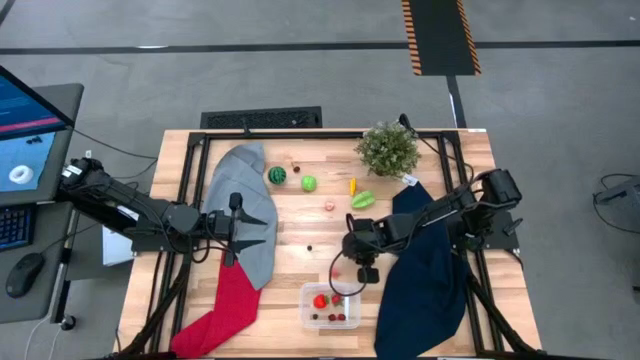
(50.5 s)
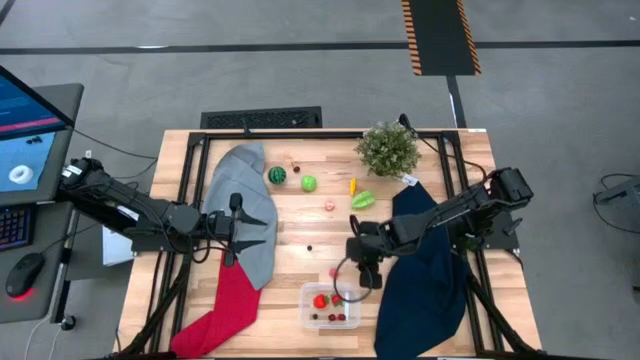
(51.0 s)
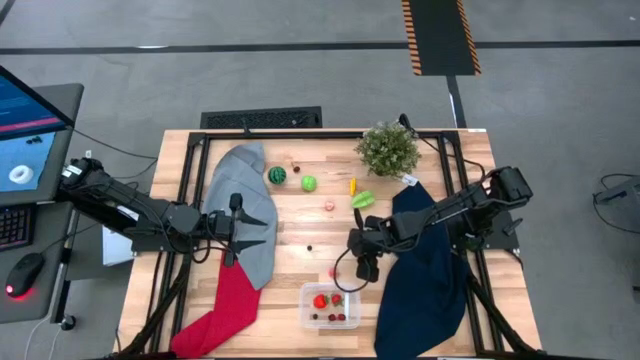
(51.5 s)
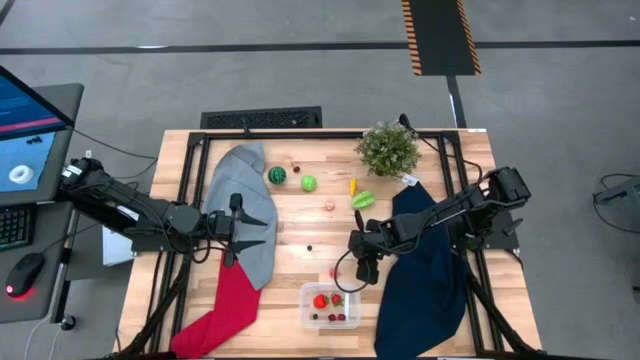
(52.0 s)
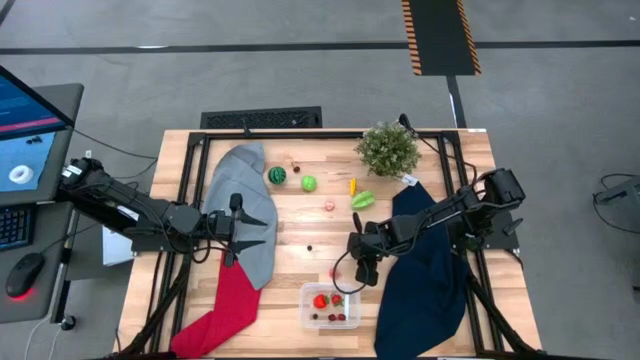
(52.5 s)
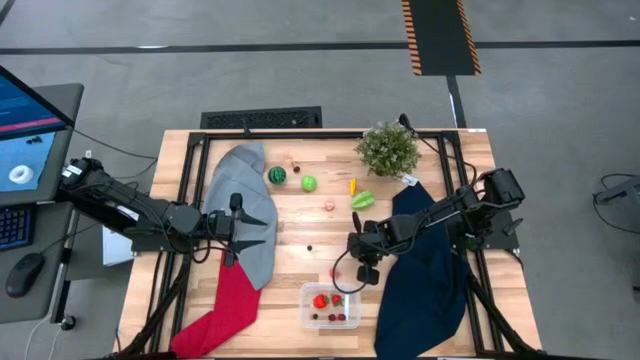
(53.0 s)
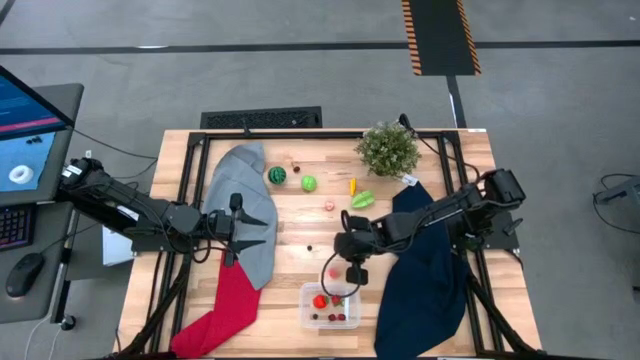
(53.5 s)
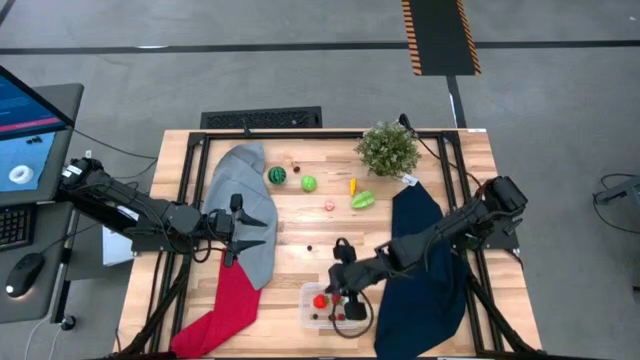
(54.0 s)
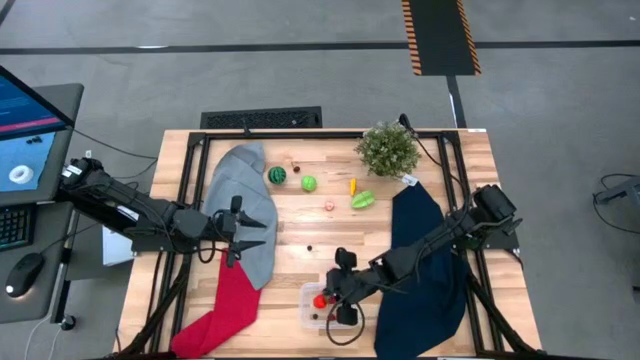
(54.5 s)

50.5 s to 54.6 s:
Task: Pick and placing Produce into tupperware
Put the cherry into the transparent bin

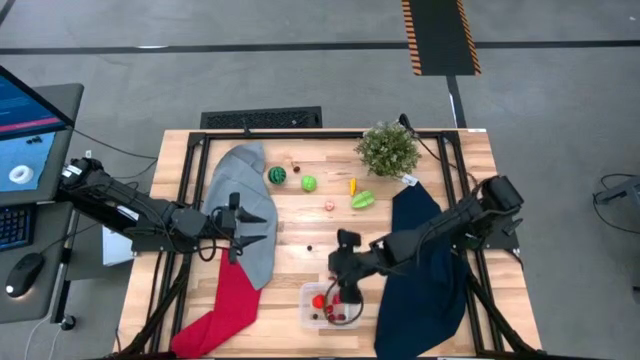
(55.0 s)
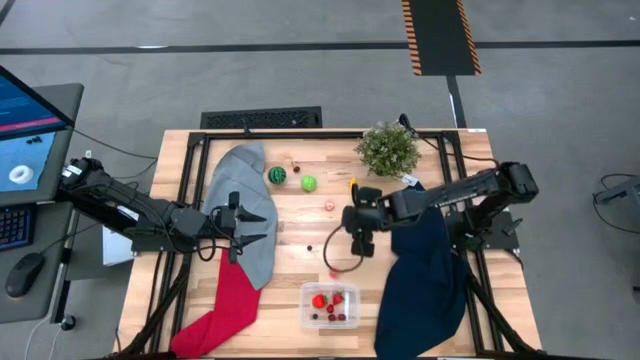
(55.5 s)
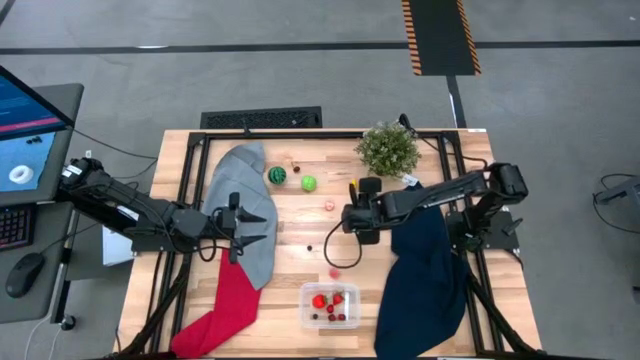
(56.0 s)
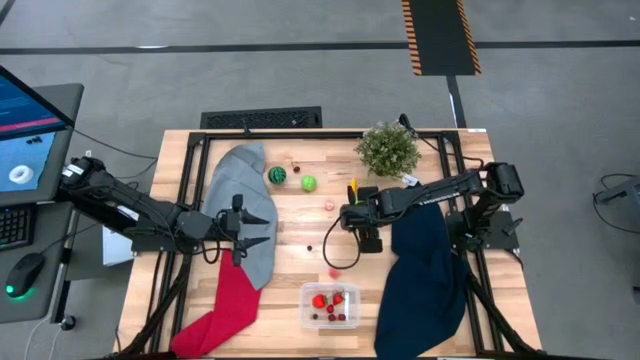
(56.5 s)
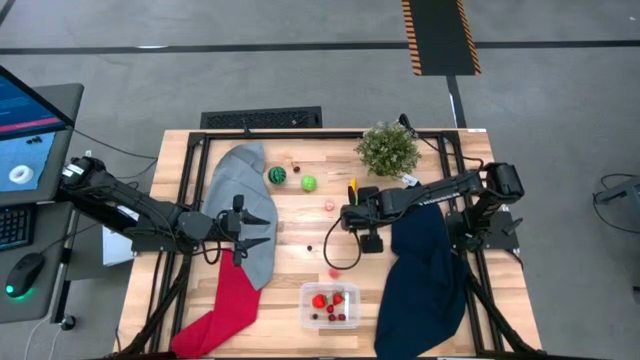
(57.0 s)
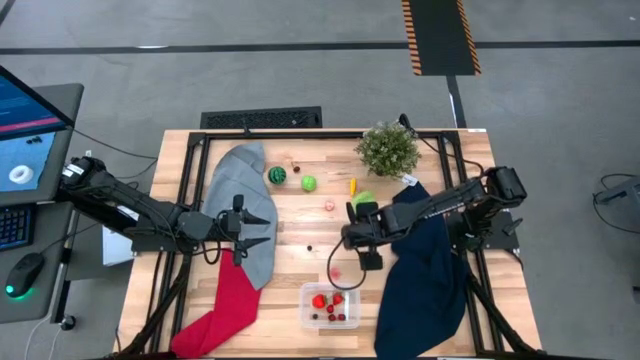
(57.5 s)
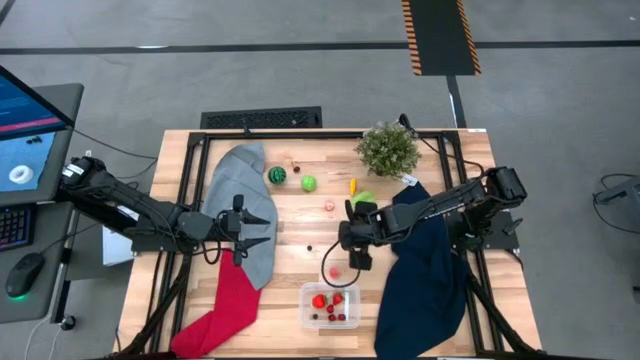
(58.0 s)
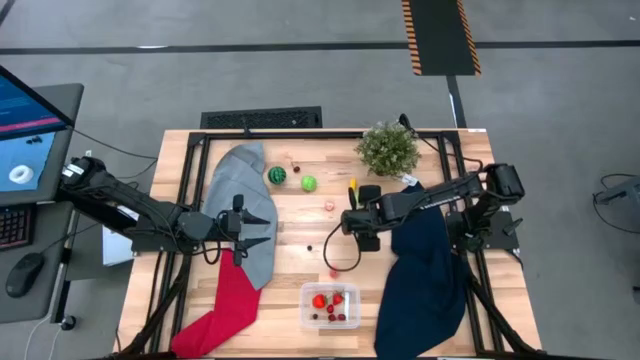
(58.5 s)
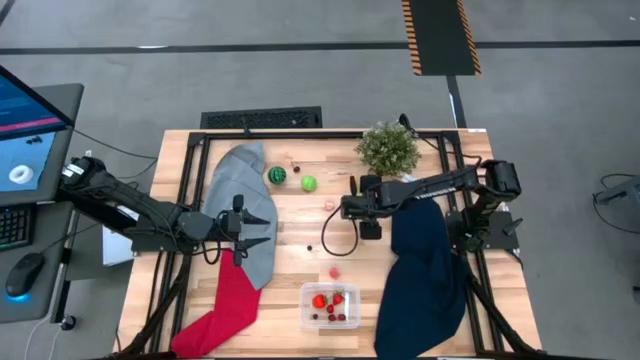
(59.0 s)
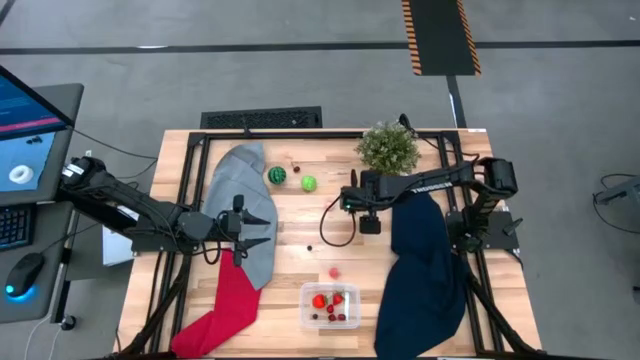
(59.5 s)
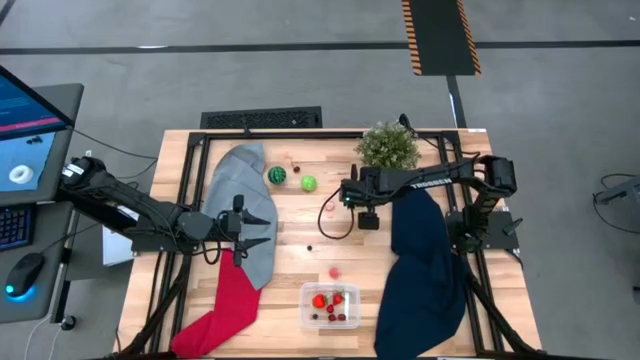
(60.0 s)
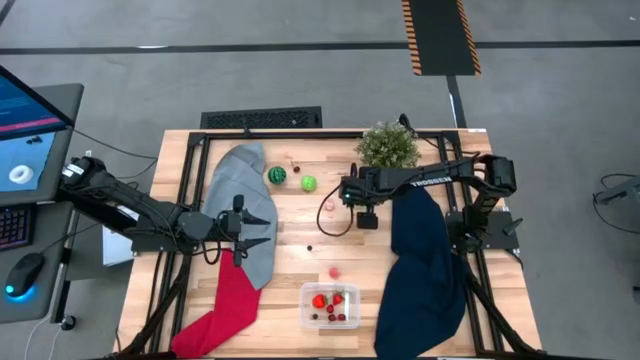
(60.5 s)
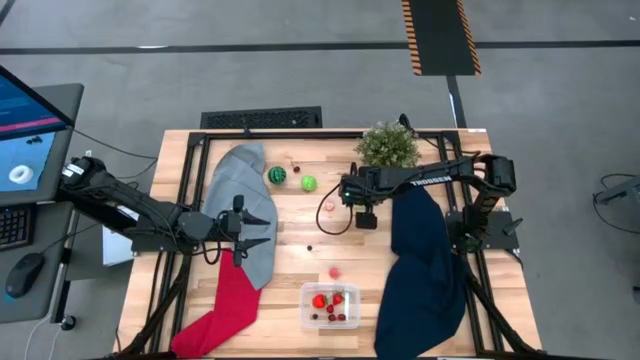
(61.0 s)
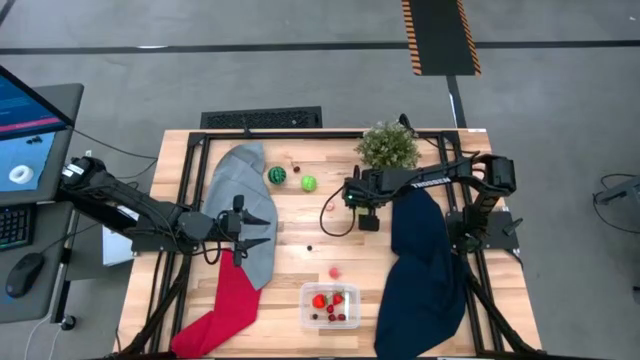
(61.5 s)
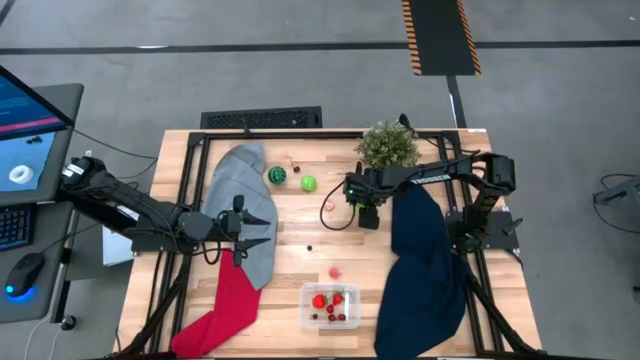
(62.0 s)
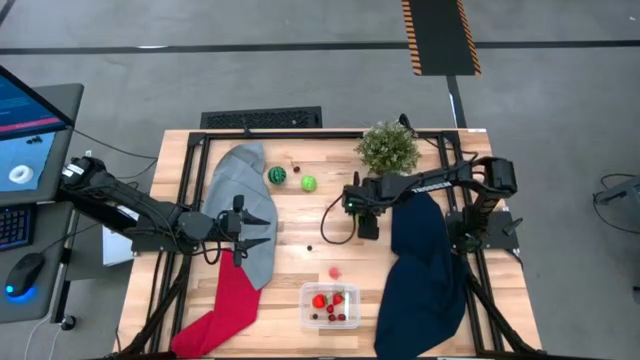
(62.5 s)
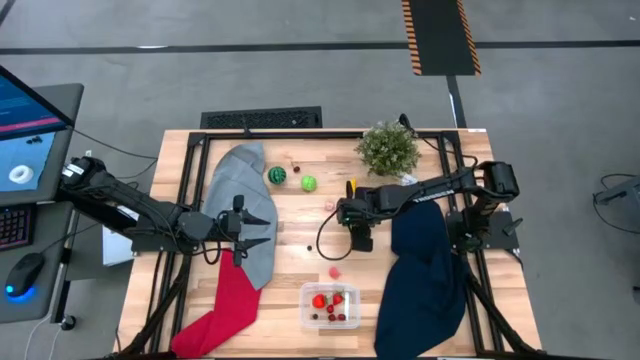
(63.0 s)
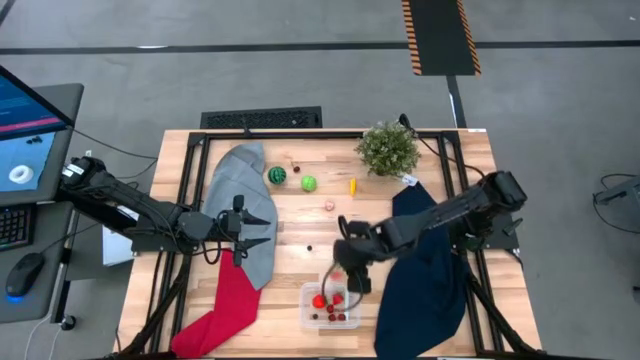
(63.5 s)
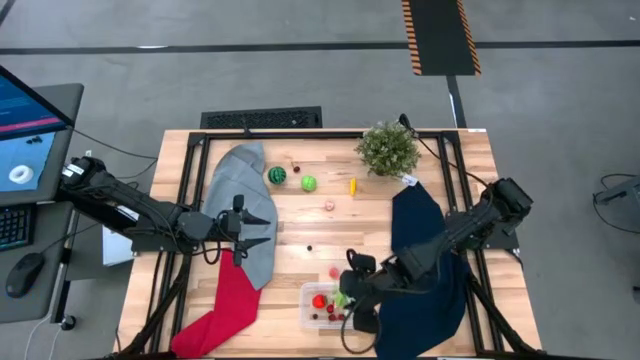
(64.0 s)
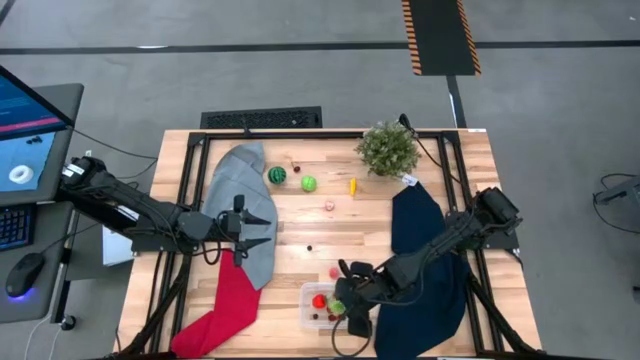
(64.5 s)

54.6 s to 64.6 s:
Put the starfruit into the transparent bin

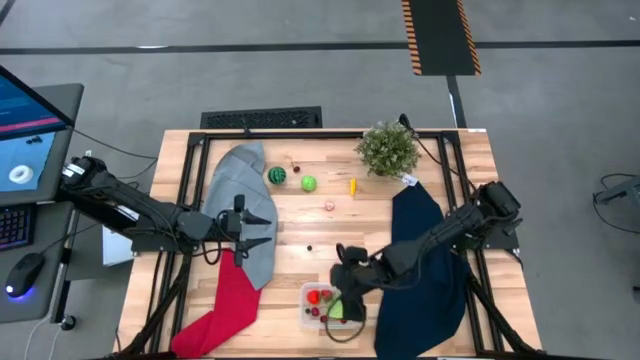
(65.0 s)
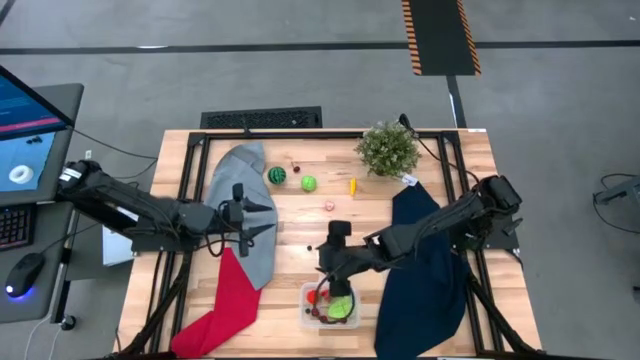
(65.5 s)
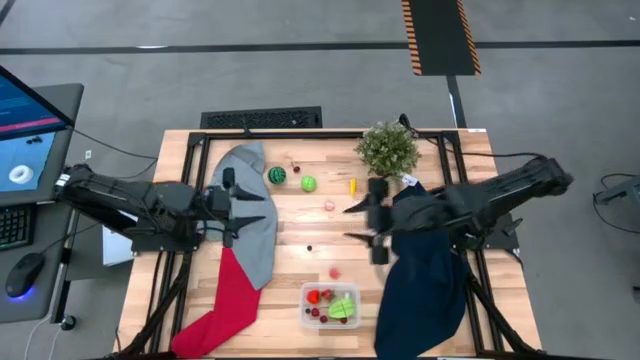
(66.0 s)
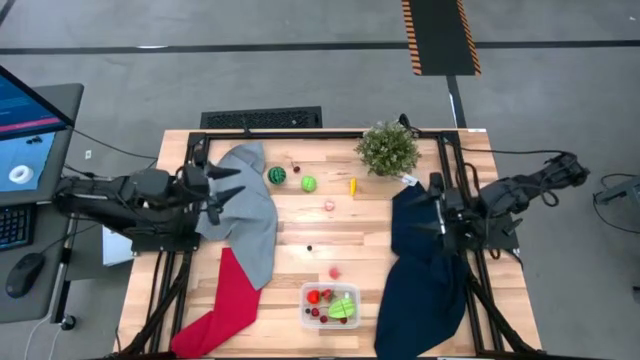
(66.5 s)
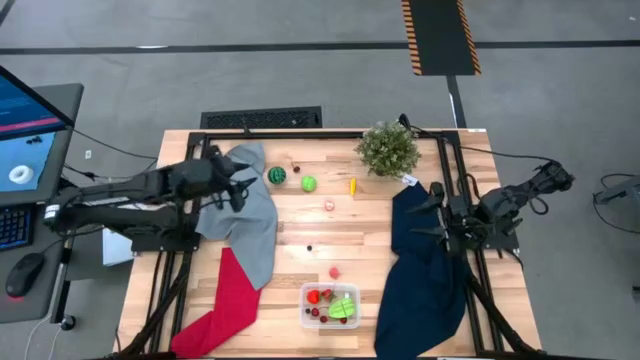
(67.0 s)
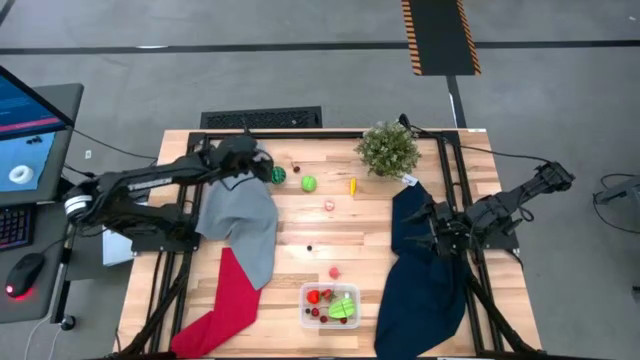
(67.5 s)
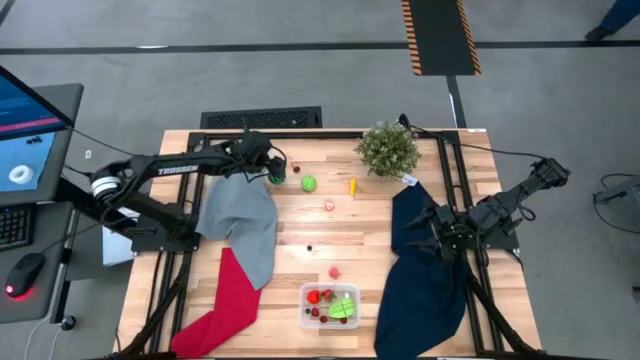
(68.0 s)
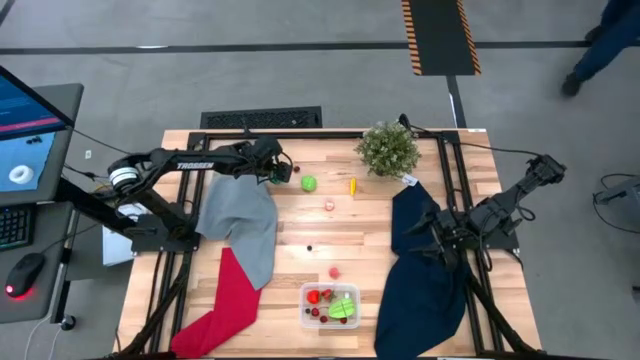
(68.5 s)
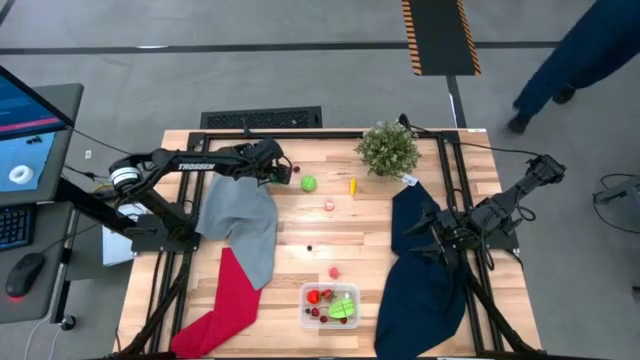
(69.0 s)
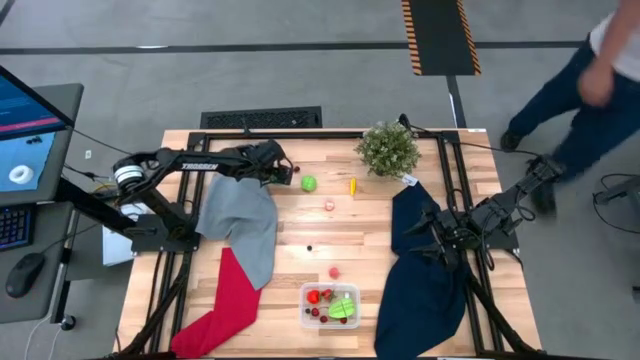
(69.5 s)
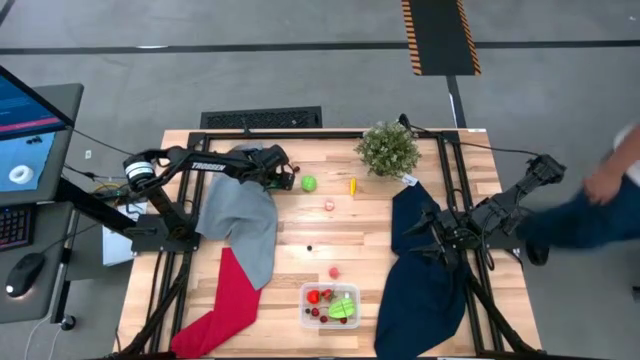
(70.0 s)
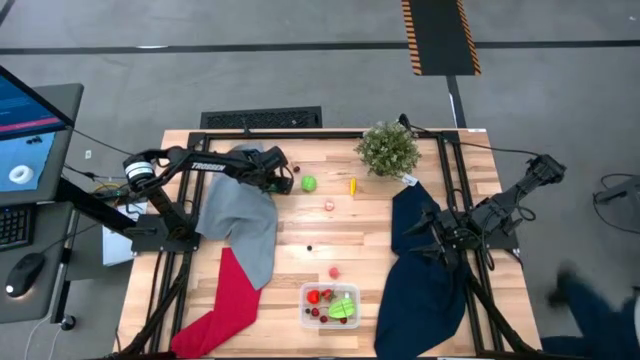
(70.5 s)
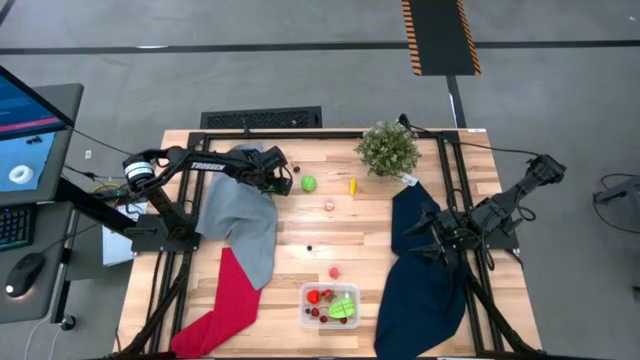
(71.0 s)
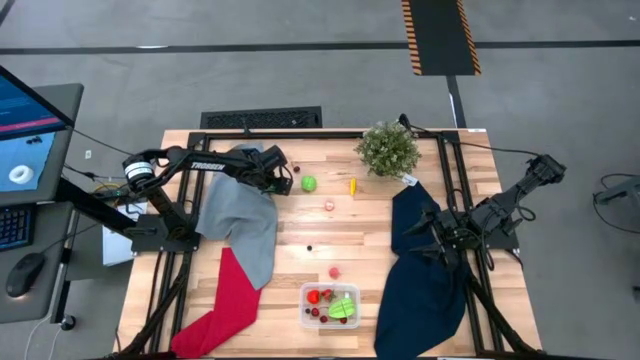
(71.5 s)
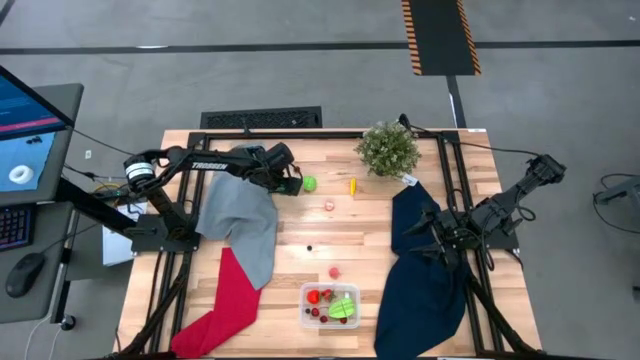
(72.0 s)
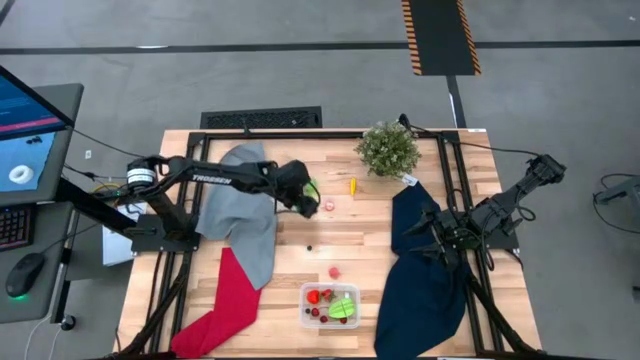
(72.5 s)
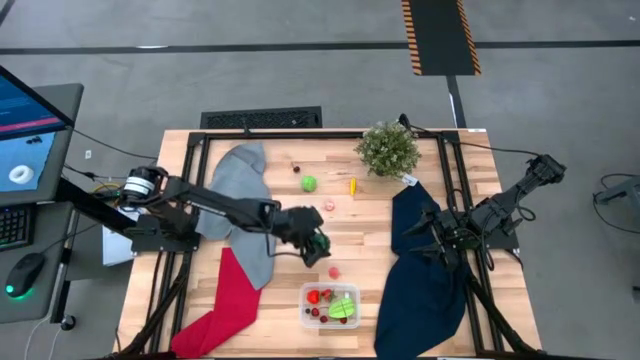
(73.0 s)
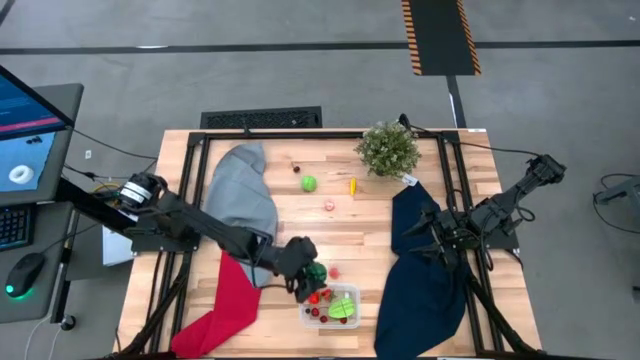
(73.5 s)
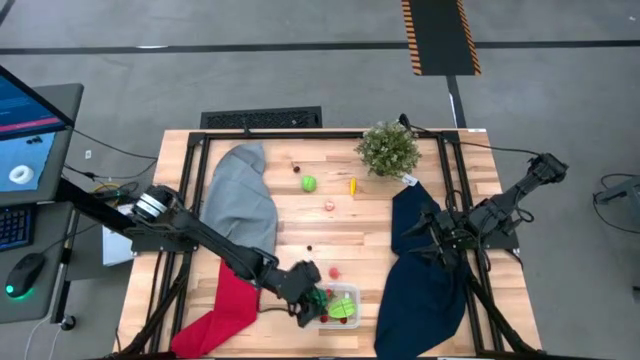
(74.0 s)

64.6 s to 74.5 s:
Put the watermelon into the transparent bin
